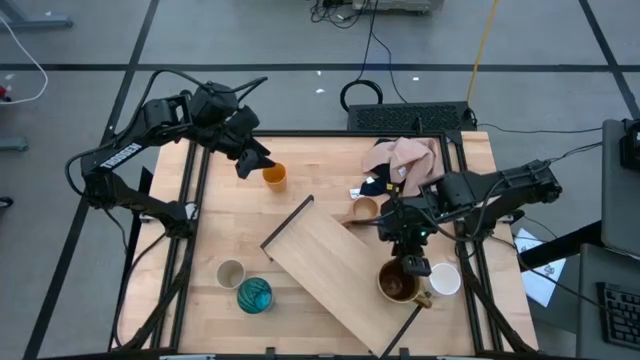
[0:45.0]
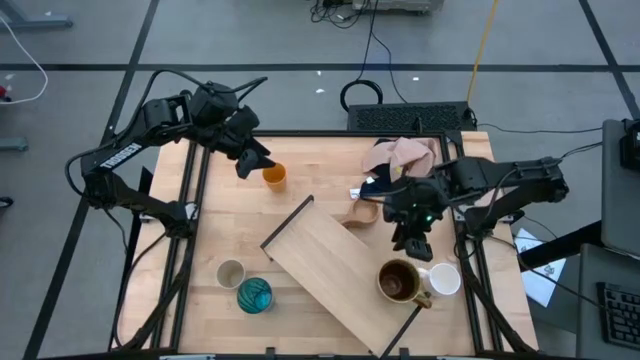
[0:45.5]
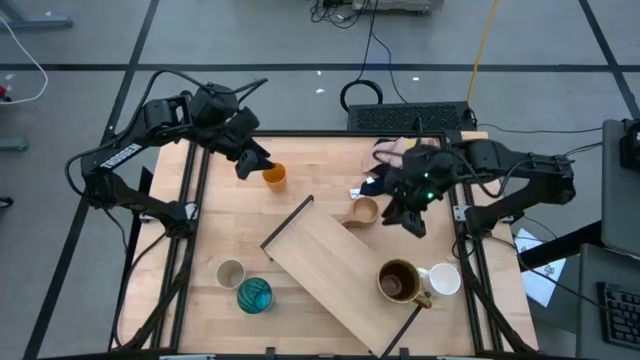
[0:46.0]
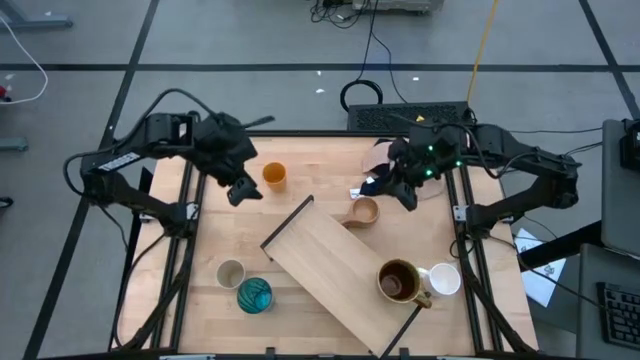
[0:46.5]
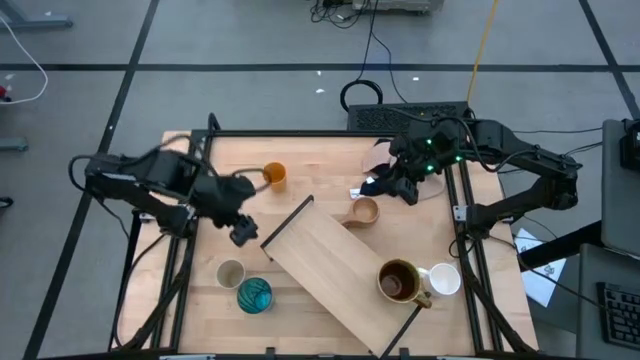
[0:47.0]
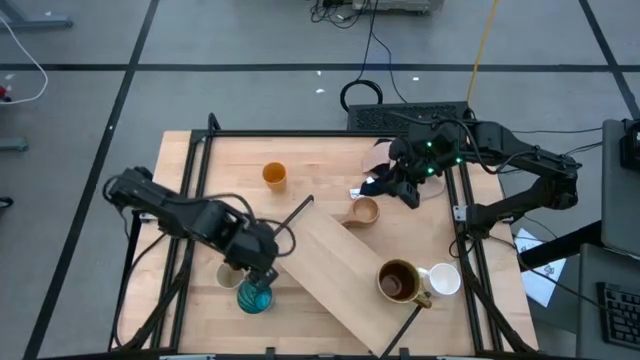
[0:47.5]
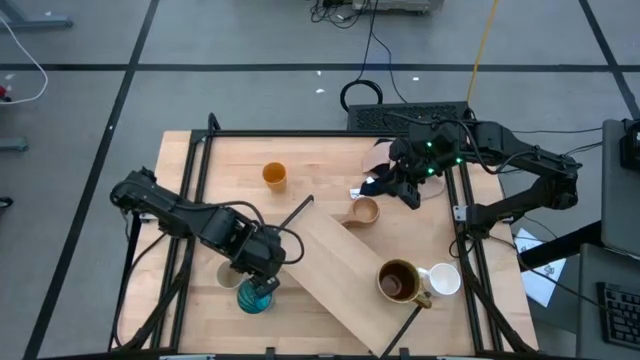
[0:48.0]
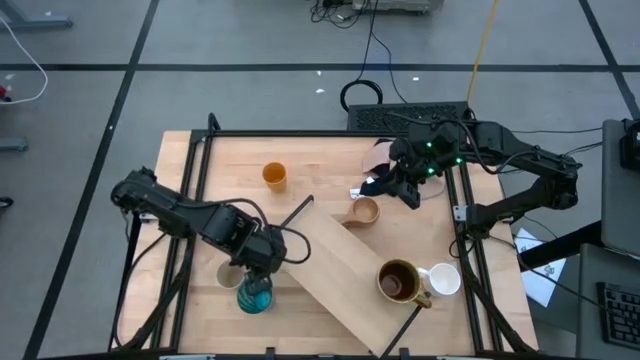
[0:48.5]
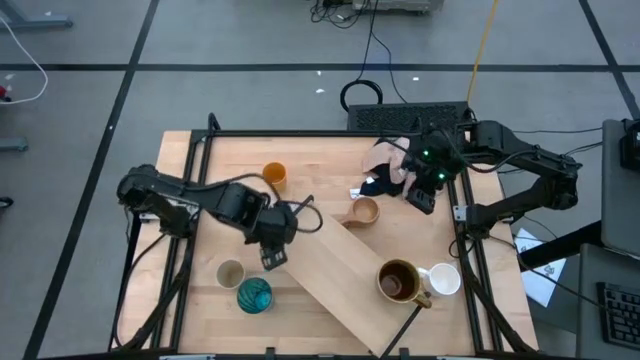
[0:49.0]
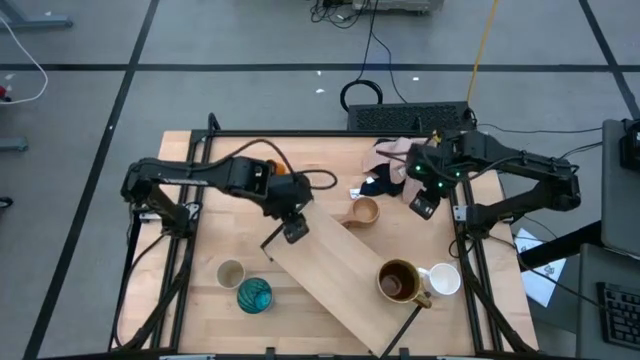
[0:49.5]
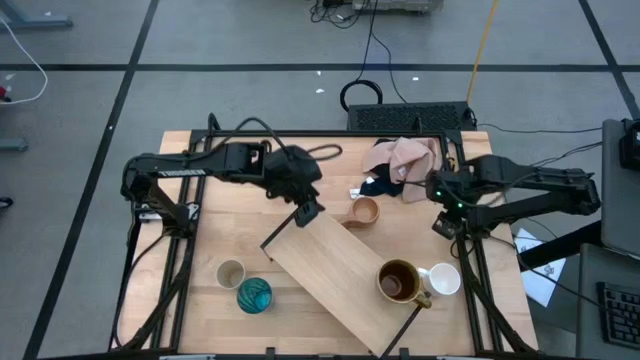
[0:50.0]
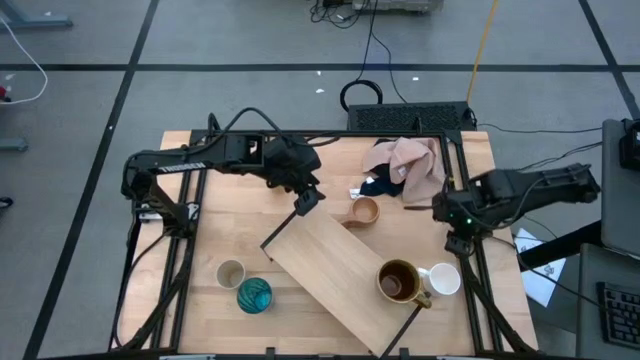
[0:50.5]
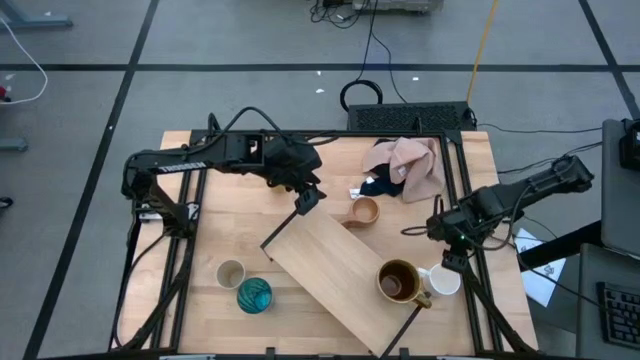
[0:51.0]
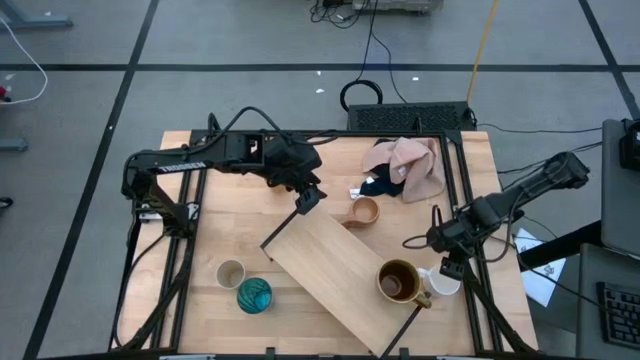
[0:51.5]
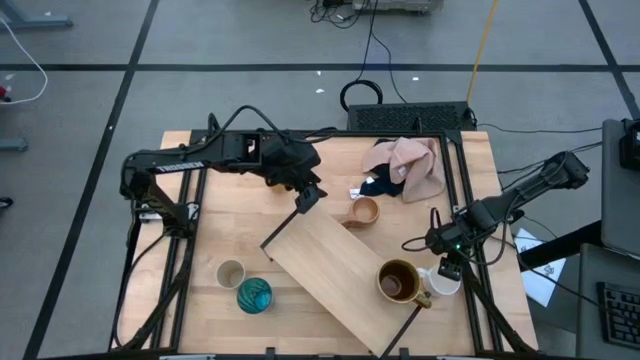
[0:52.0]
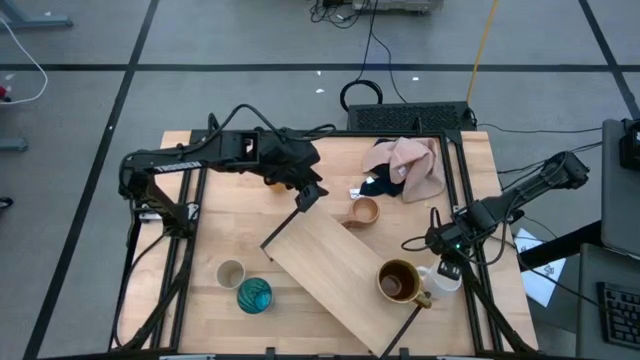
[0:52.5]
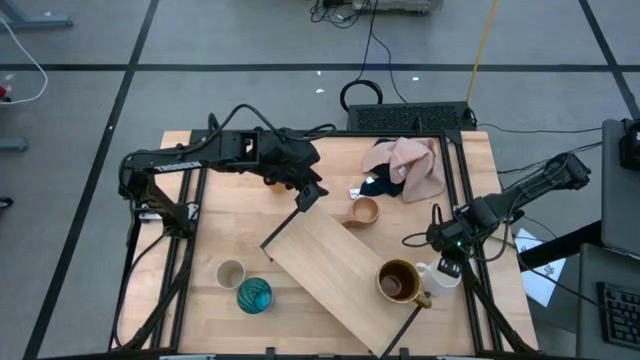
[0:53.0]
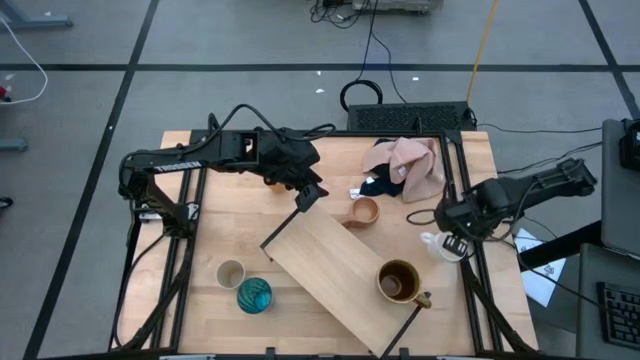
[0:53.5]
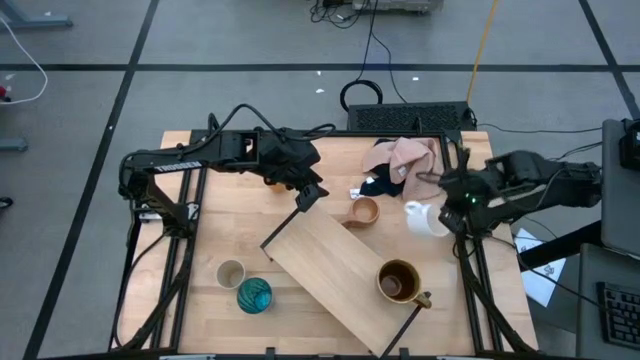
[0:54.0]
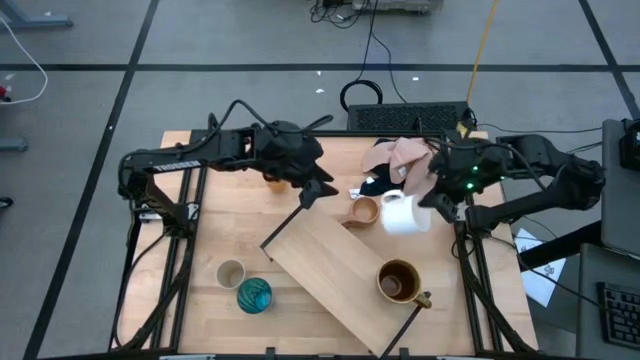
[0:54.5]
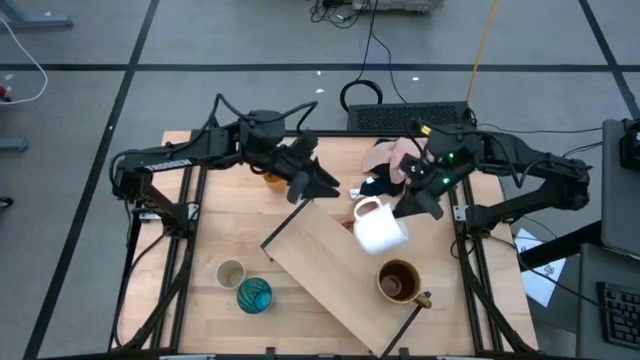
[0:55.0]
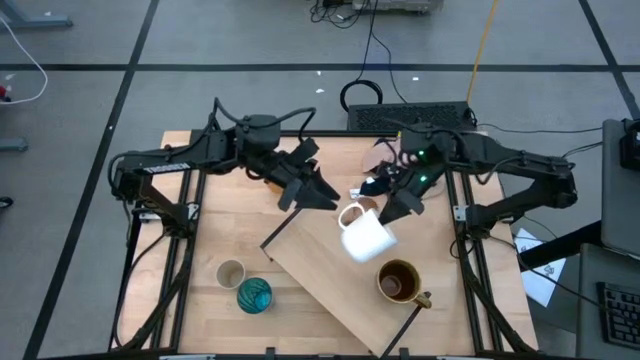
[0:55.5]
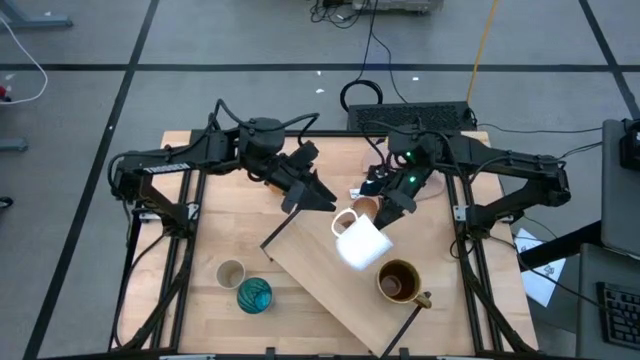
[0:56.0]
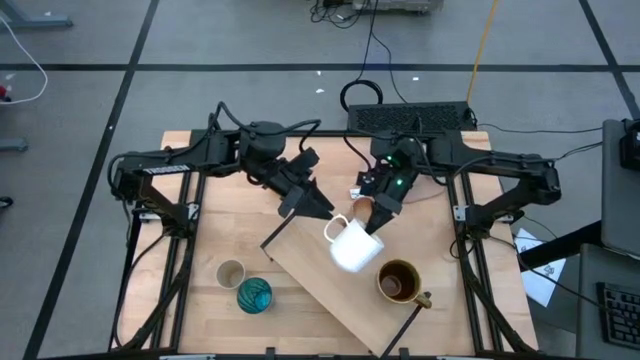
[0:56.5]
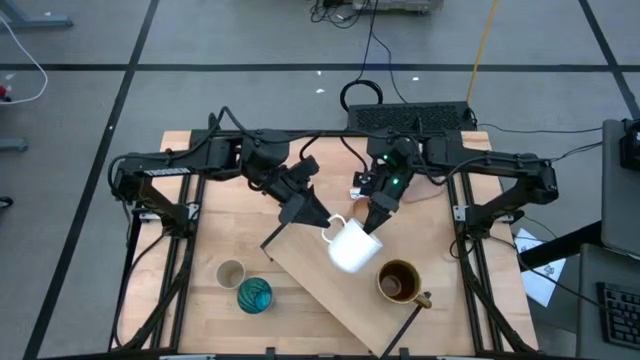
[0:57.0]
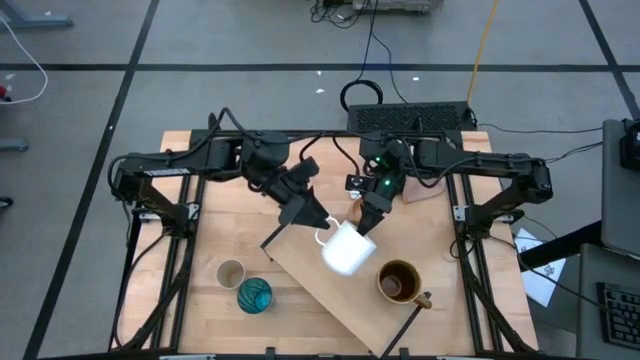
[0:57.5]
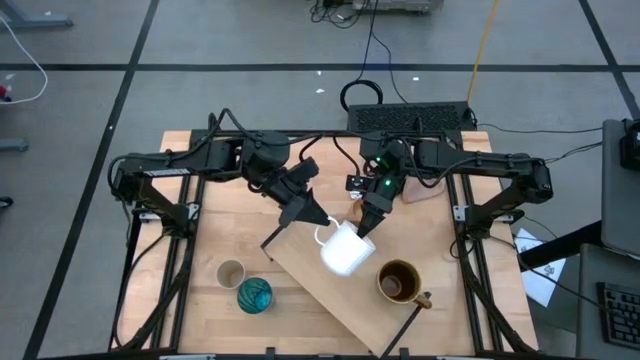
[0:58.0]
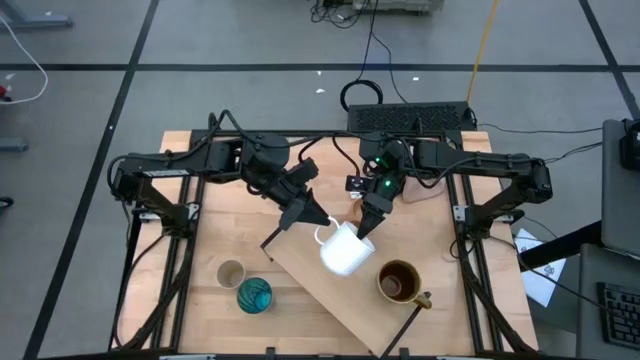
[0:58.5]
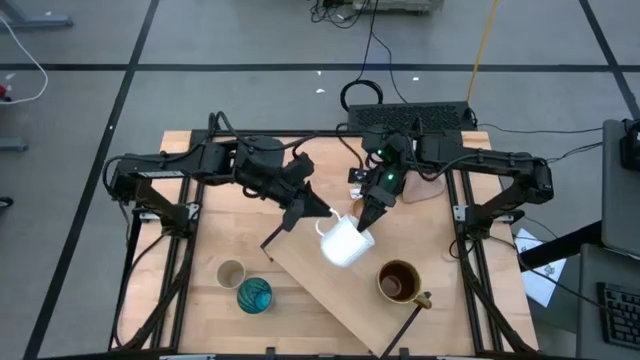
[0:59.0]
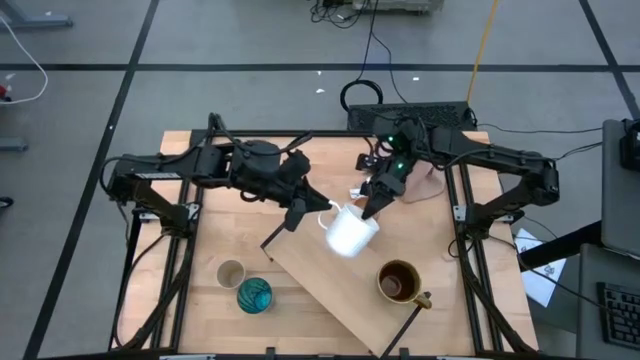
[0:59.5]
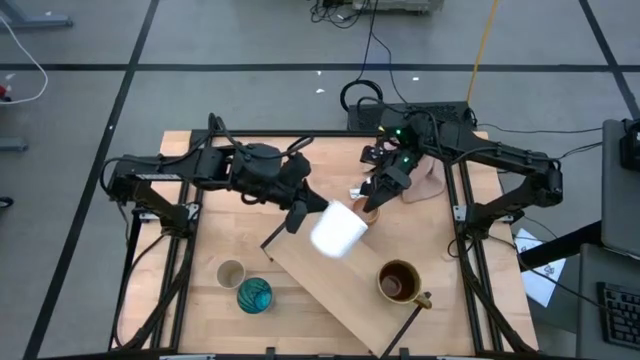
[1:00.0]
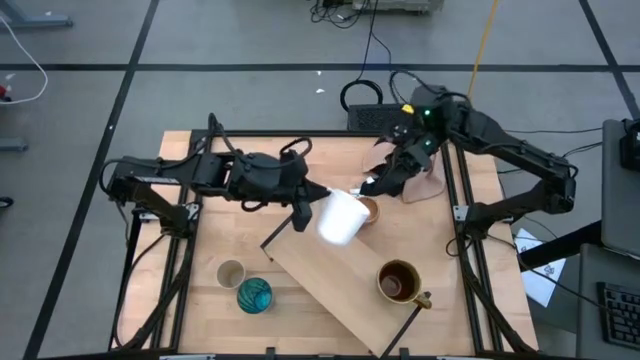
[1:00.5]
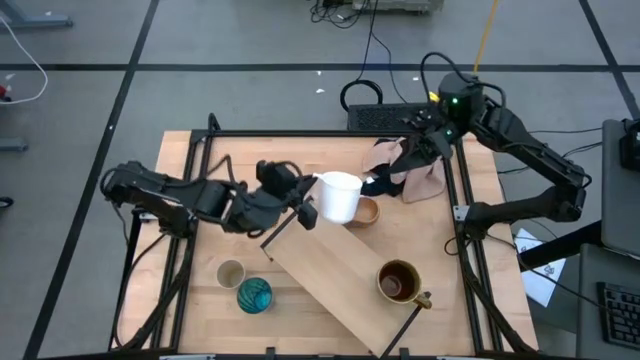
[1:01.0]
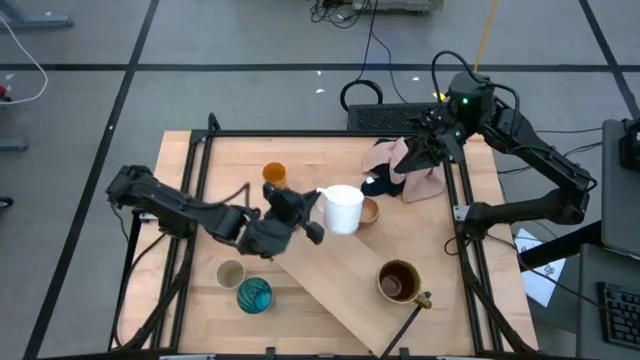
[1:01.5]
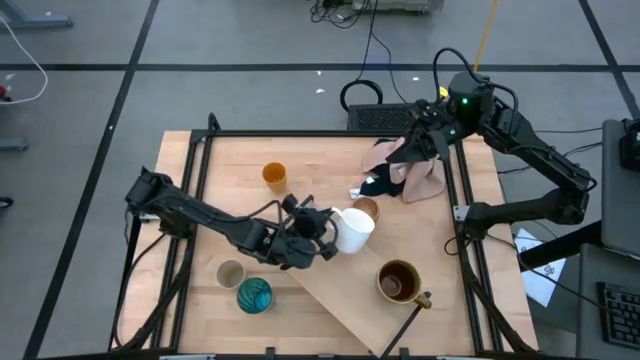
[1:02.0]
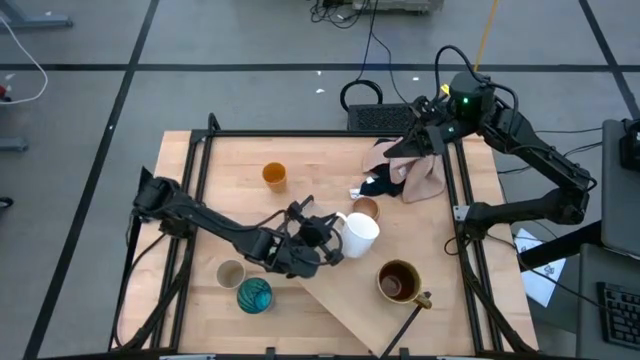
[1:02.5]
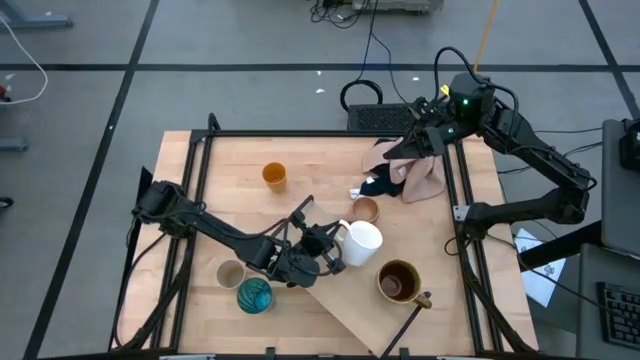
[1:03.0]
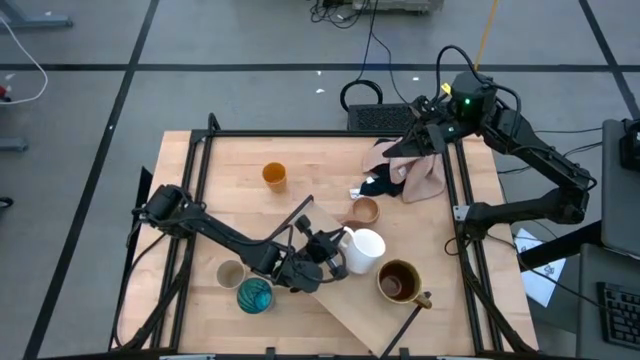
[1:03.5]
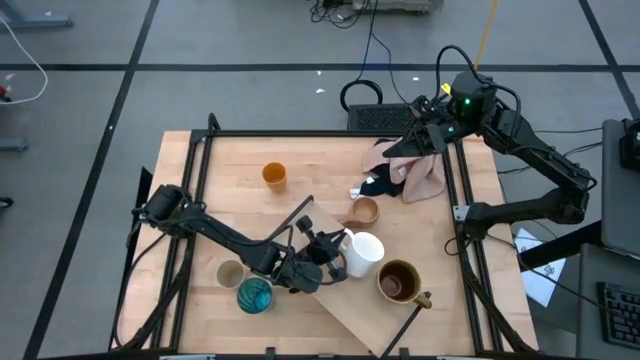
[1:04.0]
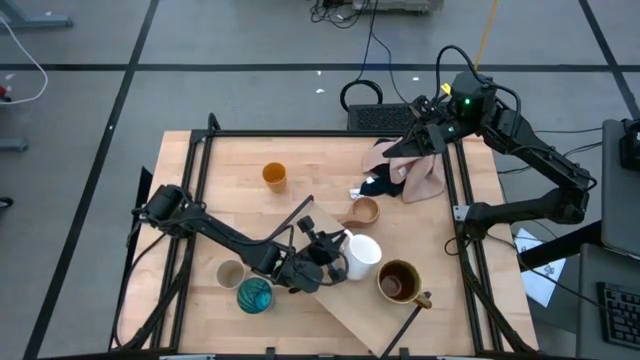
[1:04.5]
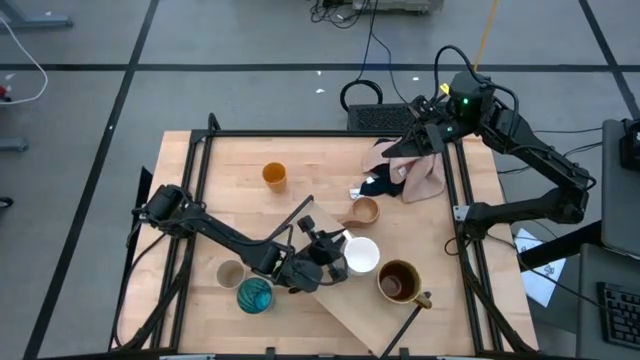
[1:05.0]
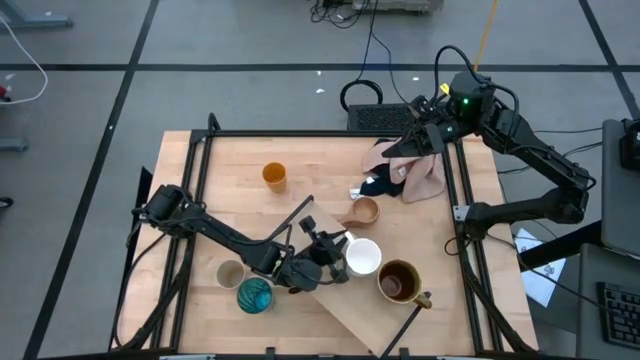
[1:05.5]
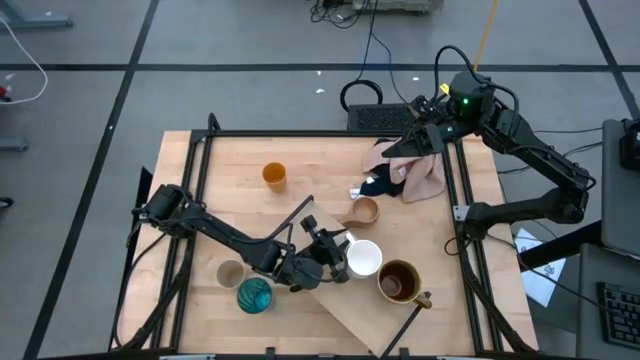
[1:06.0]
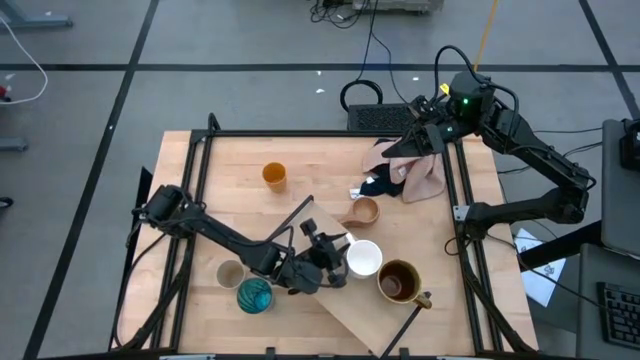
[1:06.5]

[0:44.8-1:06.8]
Task: Stack small to large cups/mugs on shelf
Put the white mug on the shelf

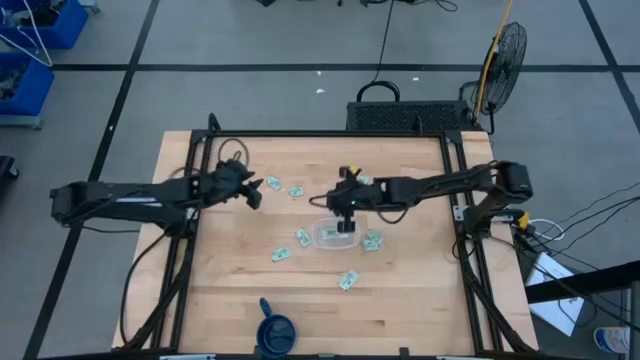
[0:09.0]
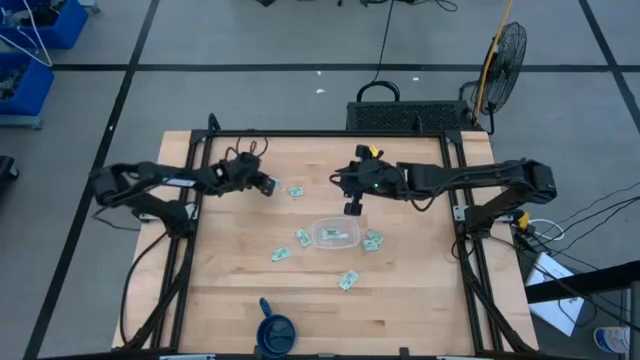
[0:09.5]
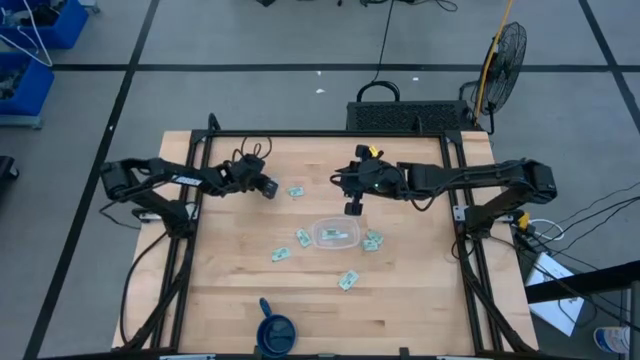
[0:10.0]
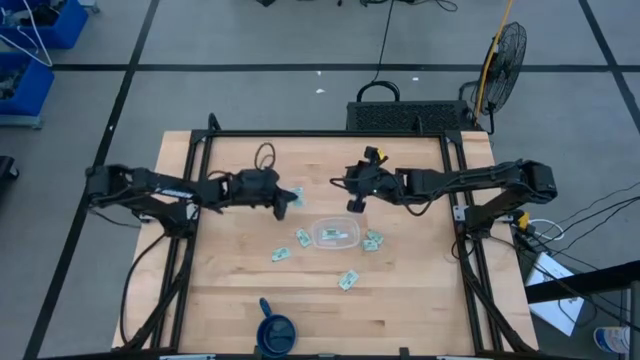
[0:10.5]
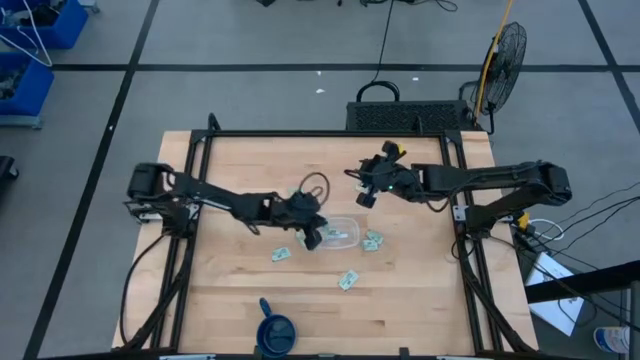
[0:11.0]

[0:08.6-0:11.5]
Task: Pick and place Stevia / Truvia into bins
Put the stevia packet into the transparent container
